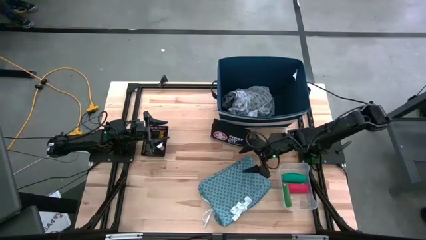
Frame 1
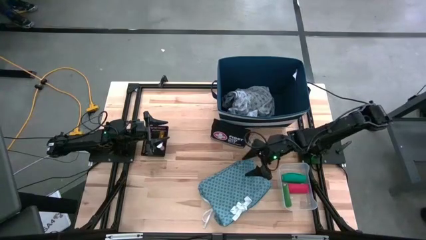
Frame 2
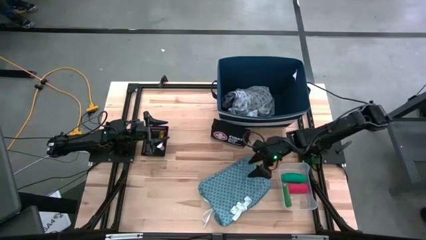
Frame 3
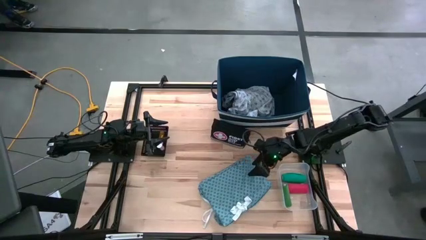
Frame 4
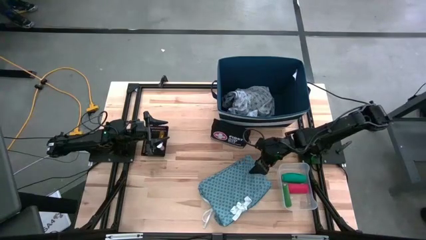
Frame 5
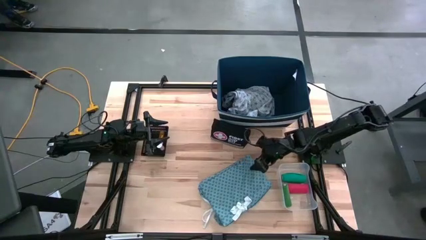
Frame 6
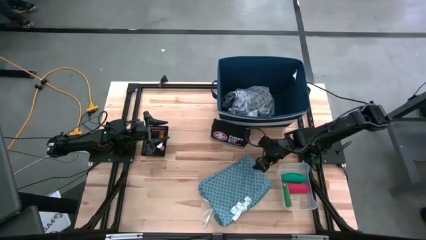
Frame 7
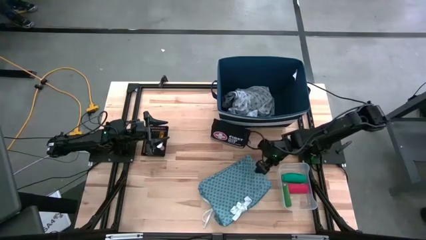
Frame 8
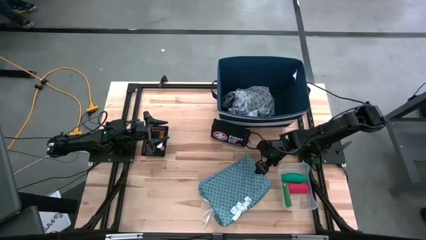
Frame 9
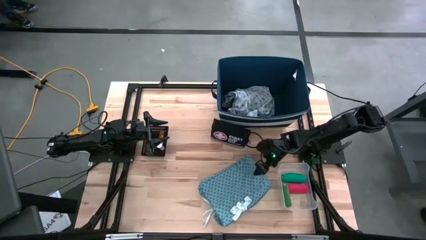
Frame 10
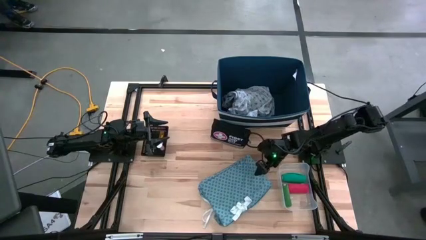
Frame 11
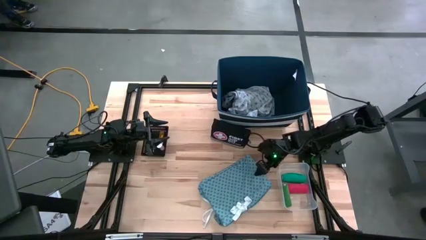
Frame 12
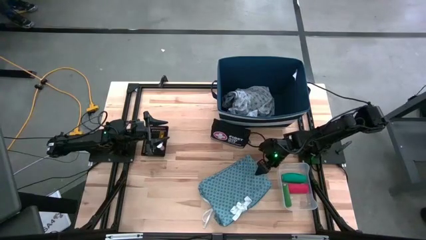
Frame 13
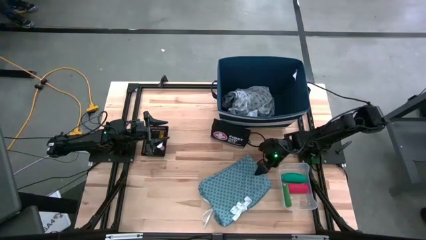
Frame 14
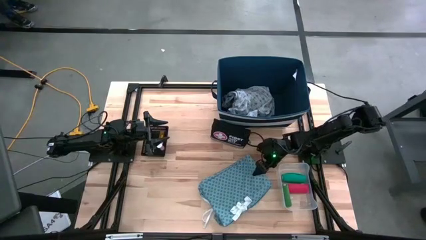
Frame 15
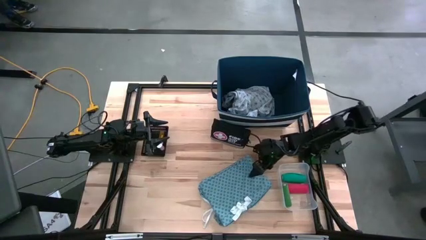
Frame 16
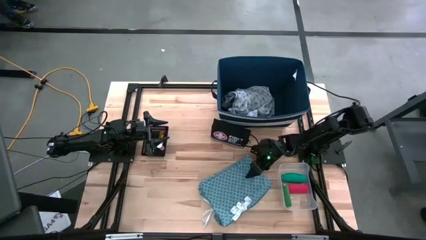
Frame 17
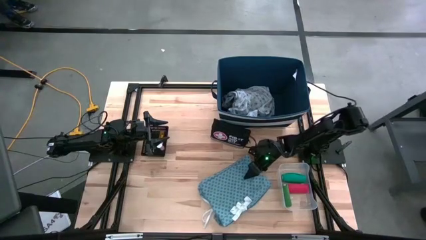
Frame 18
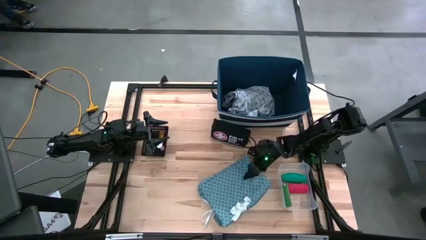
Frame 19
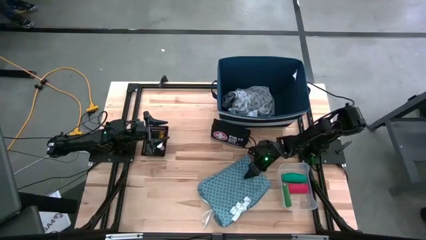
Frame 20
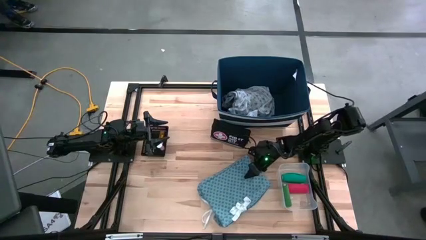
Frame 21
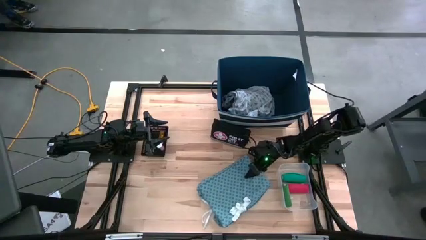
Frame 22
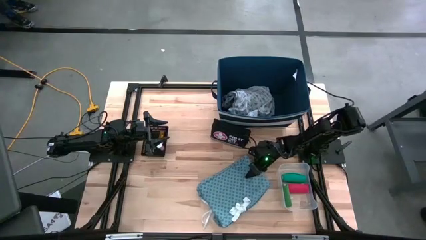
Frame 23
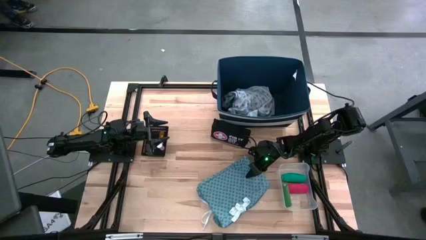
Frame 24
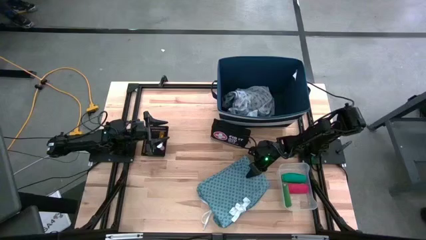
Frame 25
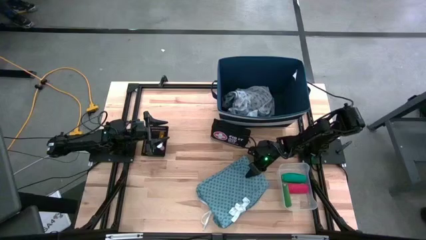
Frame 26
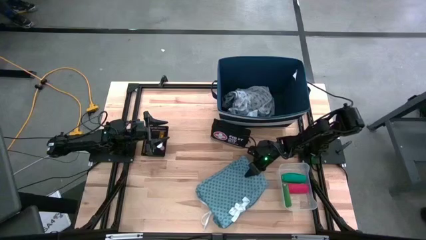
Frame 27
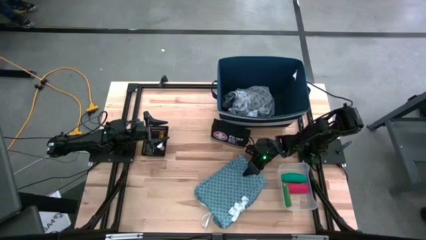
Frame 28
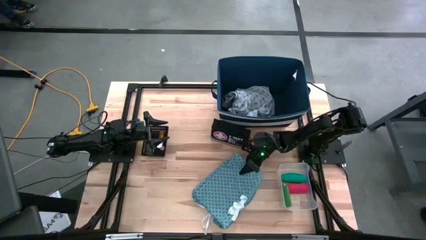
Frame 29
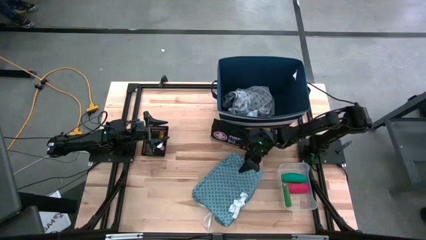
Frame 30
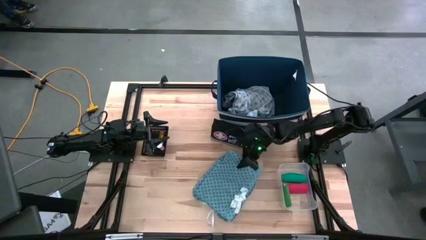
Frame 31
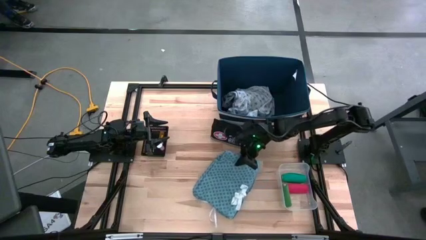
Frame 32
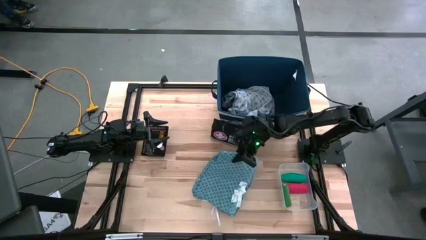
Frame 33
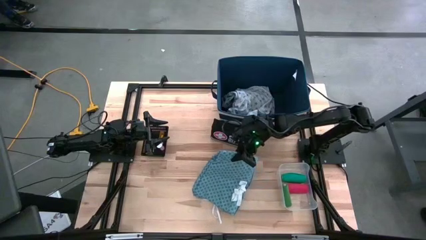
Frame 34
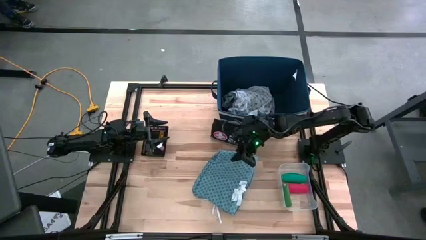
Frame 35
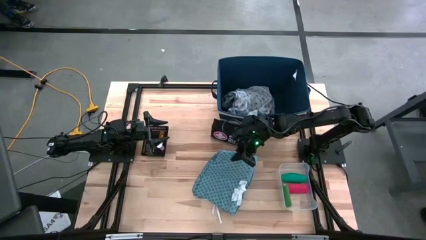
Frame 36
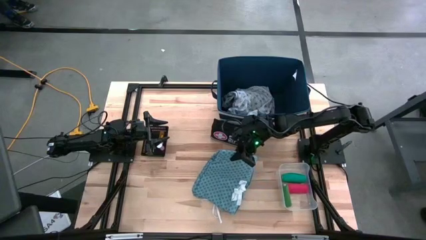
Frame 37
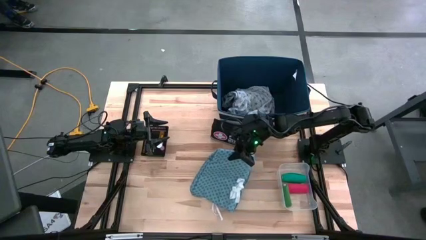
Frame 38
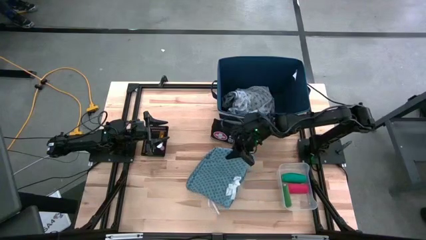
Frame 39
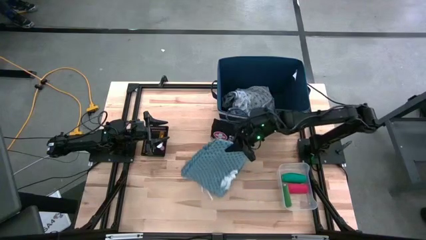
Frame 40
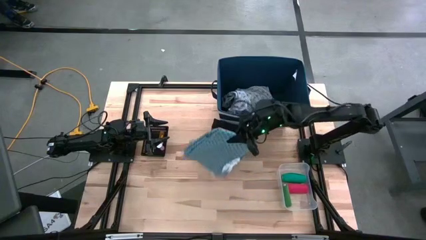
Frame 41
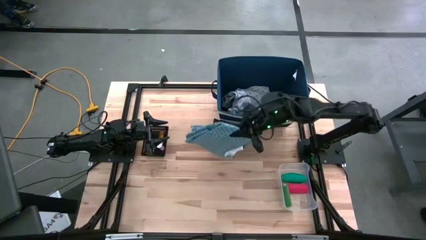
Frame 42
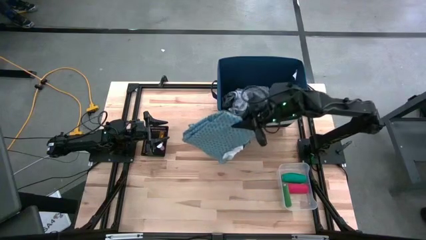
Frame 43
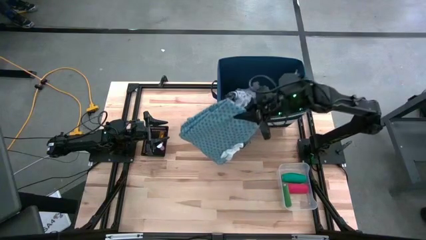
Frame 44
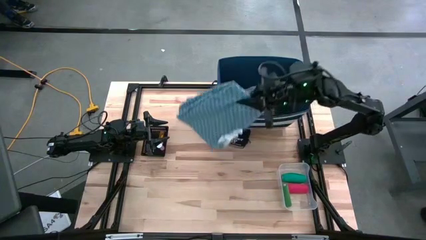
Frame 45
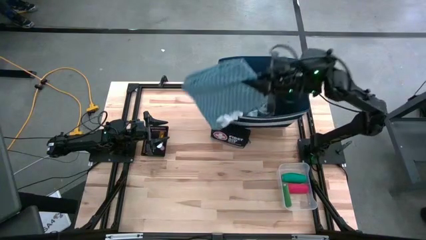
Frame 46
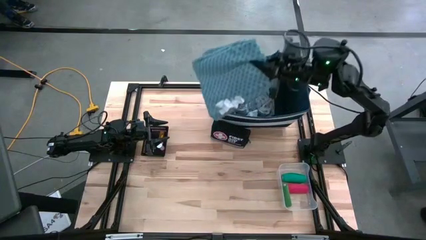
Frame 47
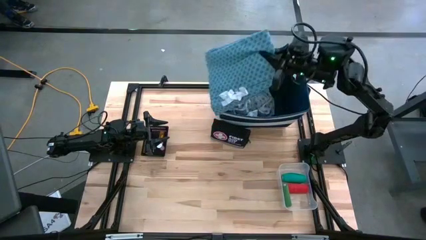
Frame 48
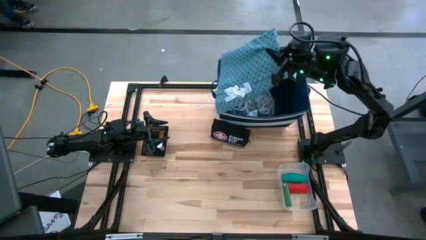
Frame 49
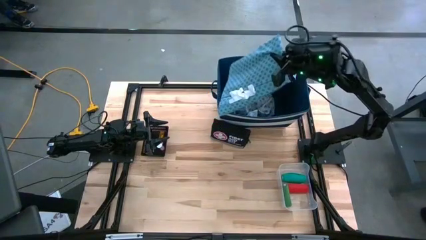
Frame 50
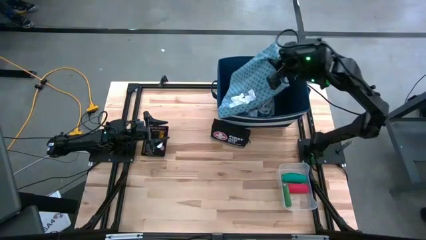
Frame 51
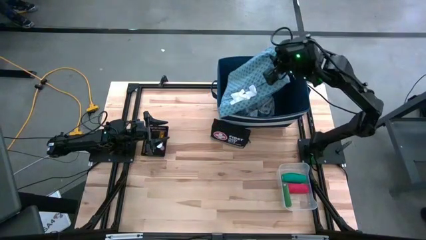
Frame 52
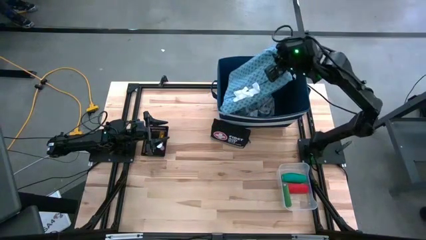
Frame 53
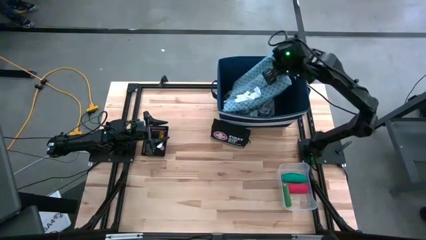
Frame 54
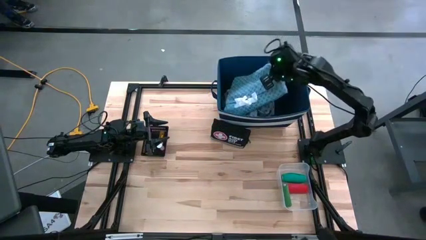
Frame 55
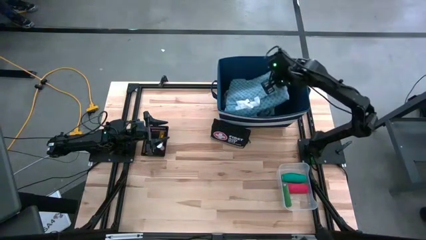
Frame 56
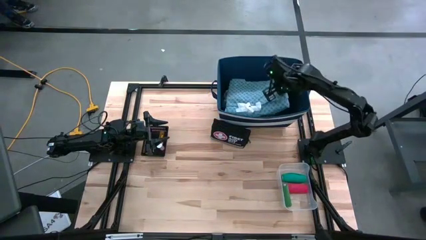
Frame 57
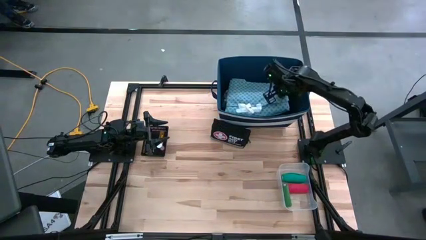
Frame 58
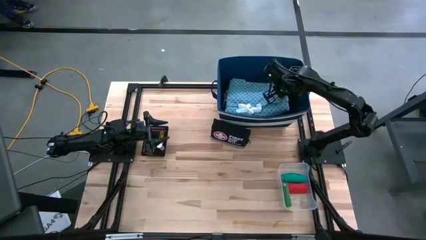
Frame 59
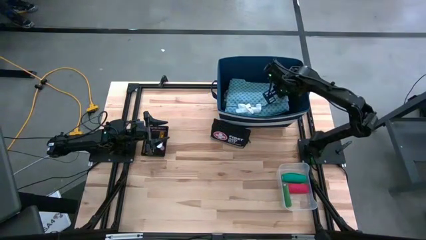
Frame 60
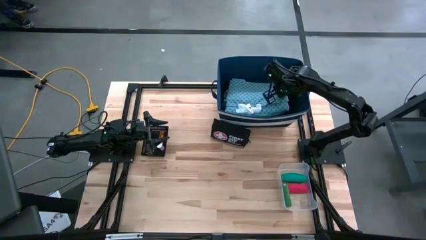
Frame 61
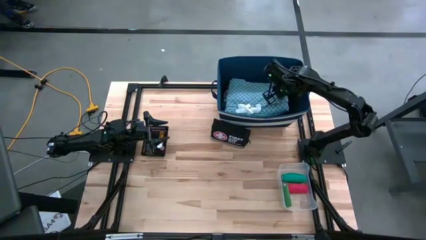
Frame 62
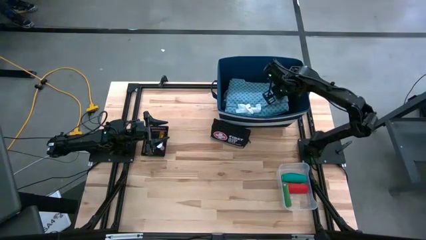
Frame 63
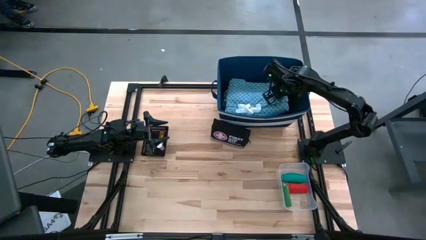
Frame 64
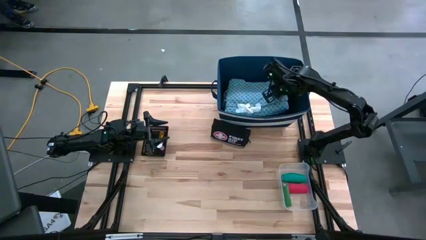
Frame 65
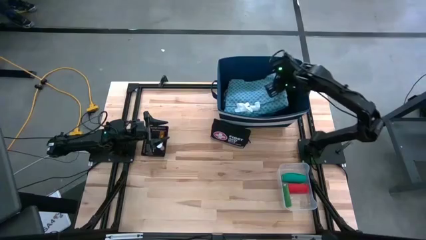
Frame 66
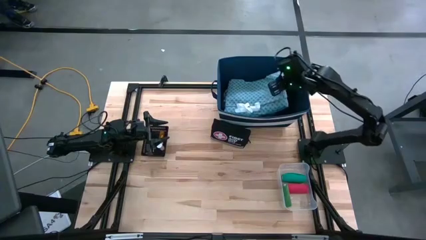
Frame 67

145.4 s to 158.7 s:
Task: Pick & place medical supplies in basket/bin
Put the blue patient gown into the blue laundry organizer
